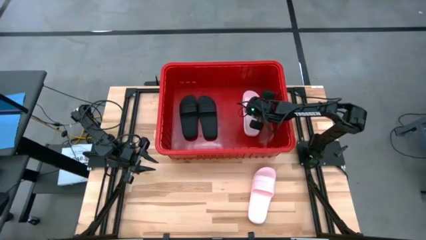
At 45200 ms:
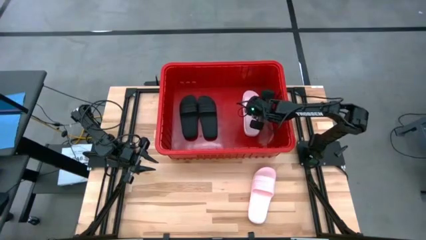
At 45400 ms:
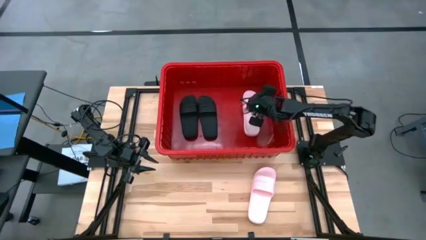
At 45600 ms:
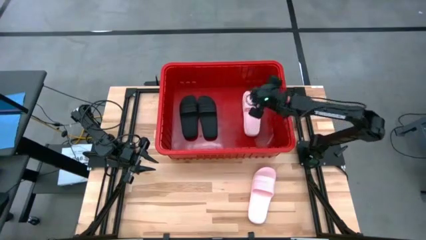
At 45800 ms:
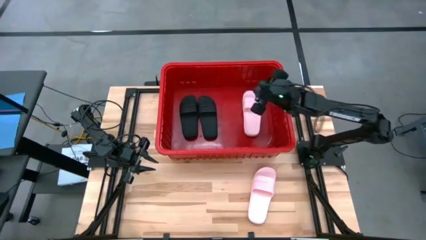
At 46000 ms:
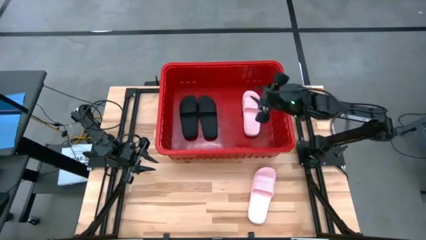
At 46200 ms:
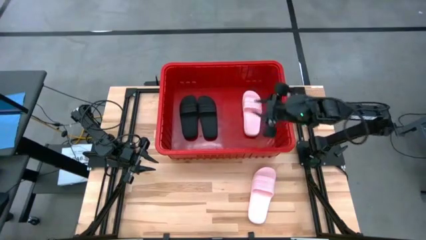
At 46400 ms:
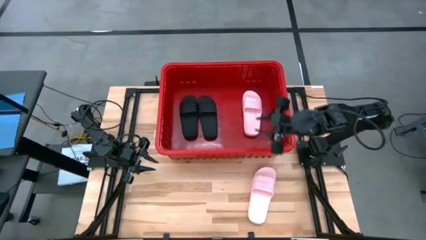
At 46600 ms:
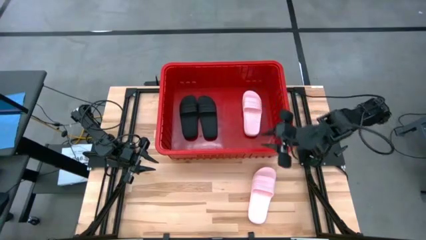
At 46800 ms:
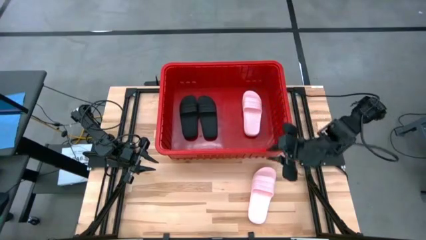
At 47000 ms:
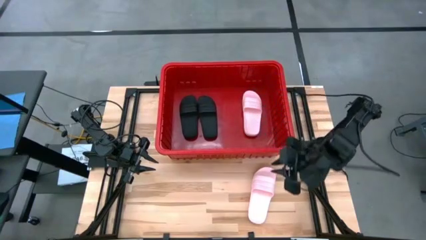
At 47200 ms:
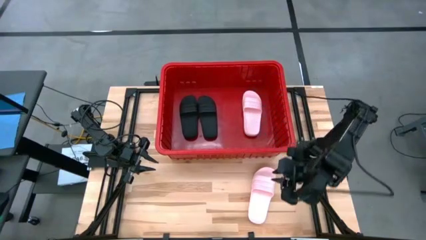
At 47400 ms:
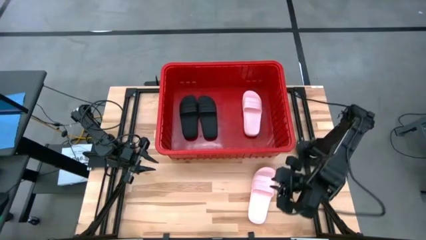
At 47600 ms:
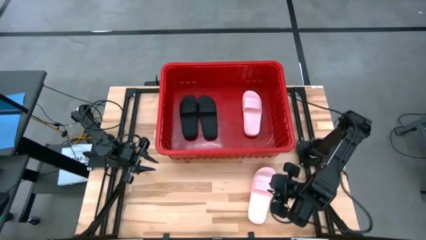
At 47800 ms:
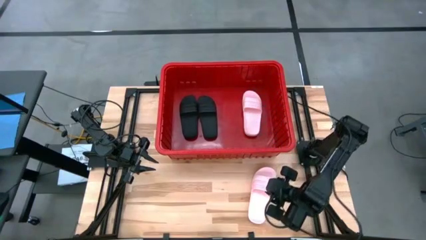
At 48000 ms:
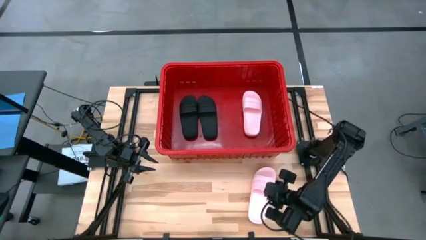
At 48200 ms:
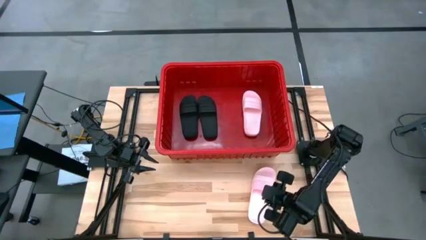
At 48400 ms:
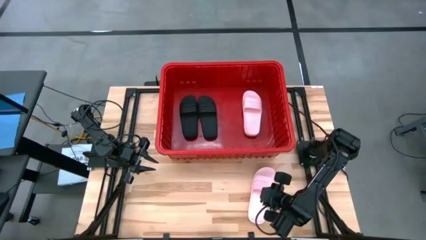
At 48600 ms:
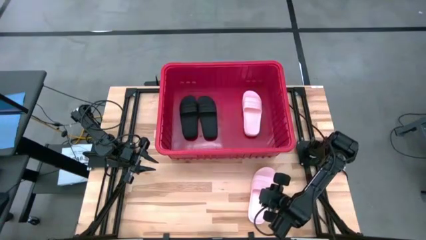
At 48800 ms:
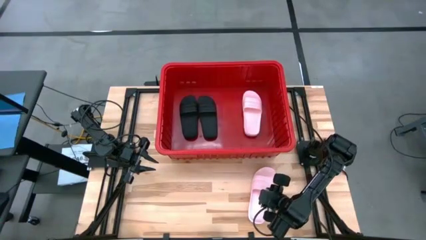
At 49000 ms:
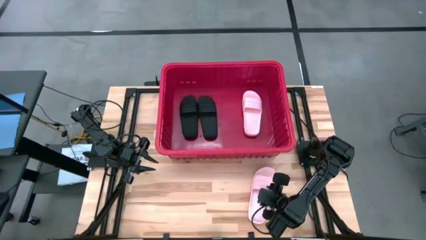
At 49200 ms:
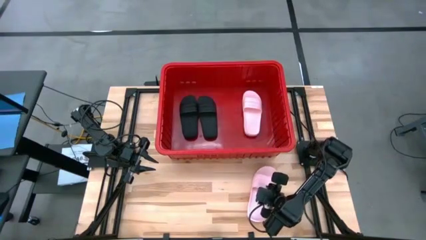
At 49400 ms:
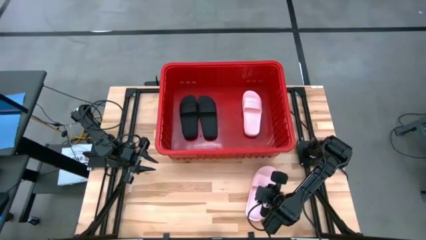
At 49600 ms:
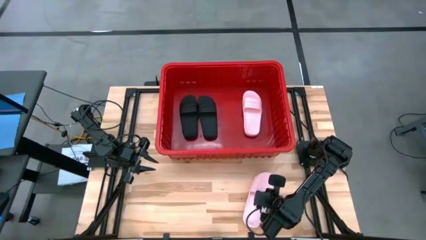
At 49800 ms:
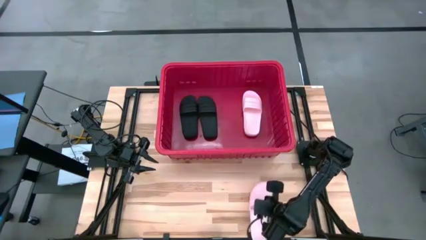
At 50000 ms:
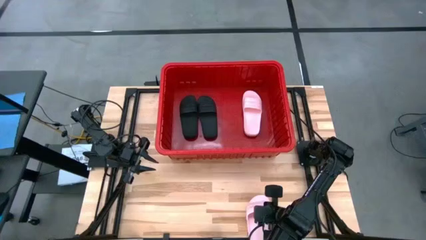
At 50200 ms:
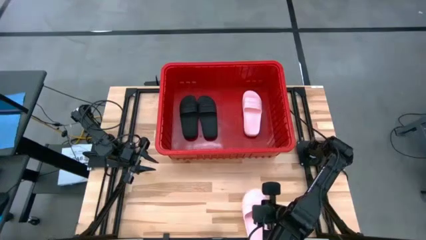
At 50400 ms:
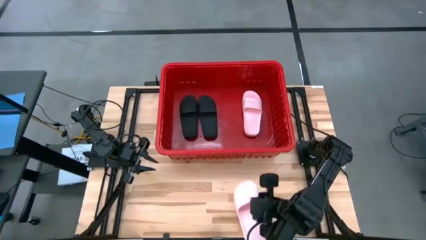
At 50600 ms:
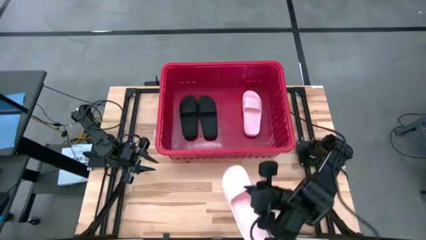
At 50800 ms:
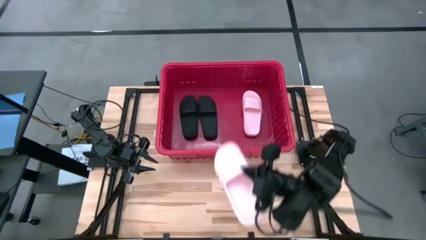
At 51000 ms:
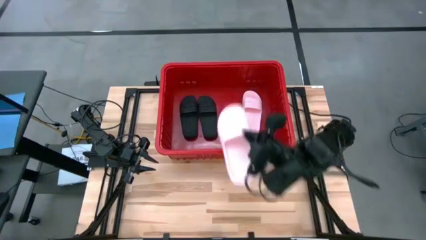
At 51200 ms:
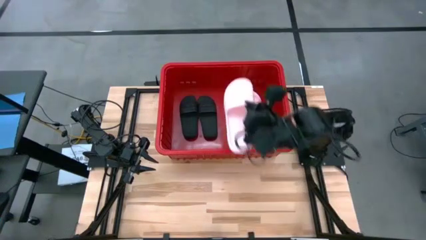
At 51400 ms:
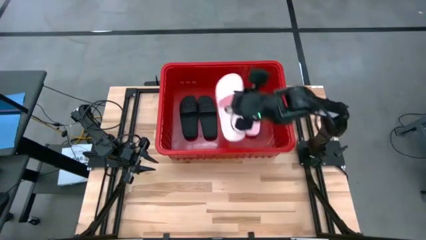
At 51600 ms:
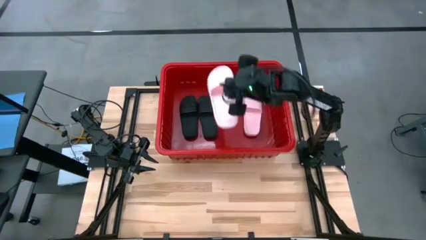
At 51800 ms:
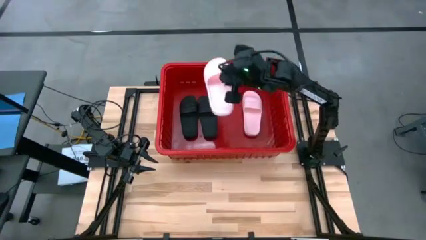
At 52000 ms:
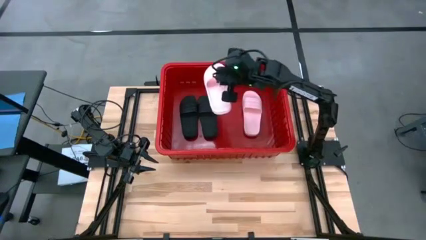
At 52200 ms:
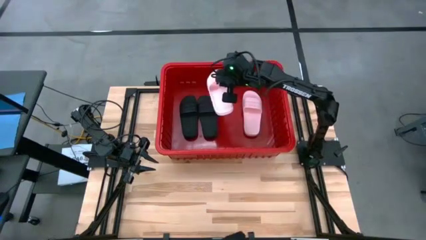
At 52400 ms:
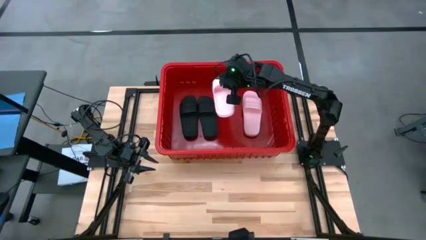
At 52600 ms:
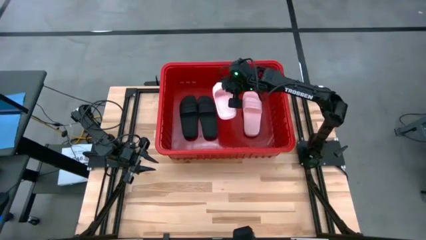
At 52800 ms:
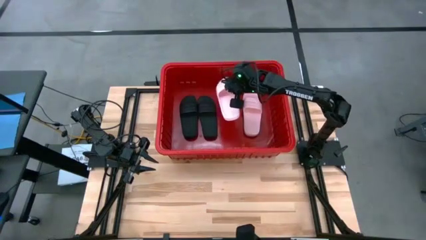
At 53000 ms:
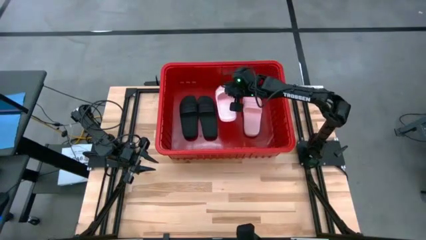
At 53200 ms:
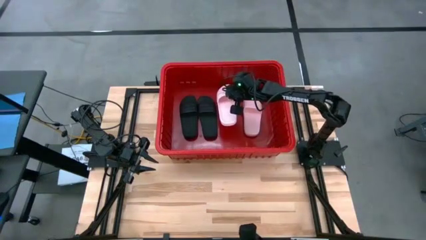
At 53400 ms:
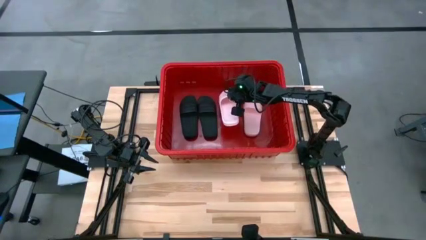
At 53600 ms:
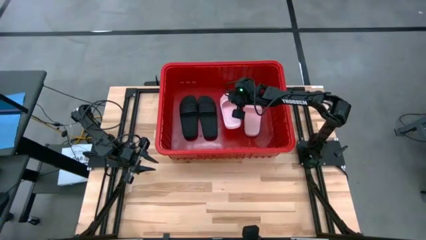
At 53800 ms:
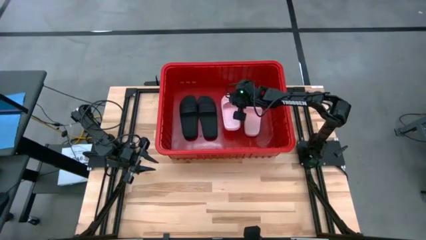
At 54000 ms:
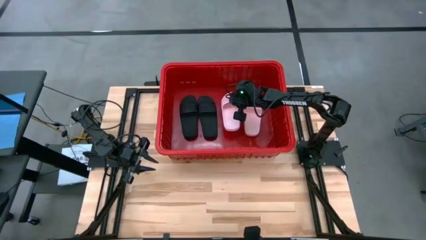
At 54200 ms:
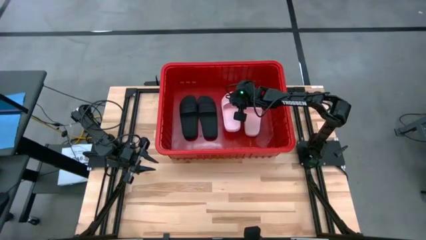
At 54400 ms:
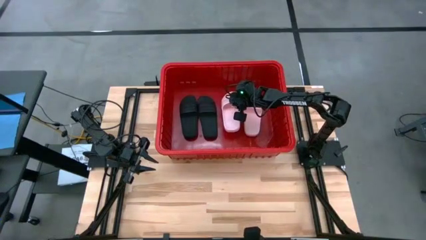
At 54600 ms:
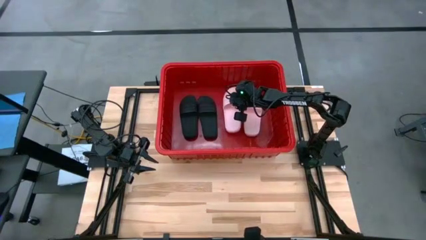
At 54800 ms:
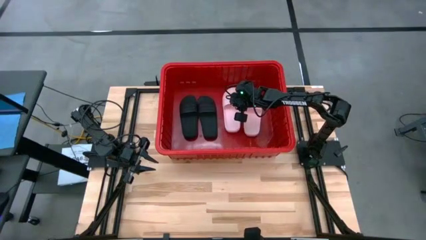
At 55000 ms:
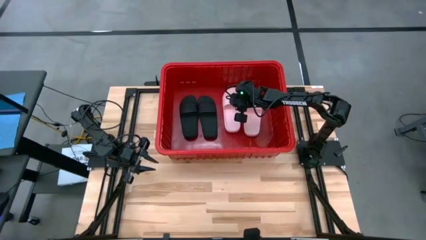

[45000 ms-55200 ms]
Task: Pick and place slides into bin
Put the pink slipper into the red bin
